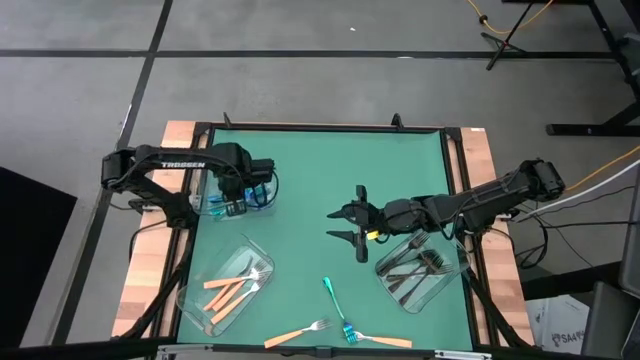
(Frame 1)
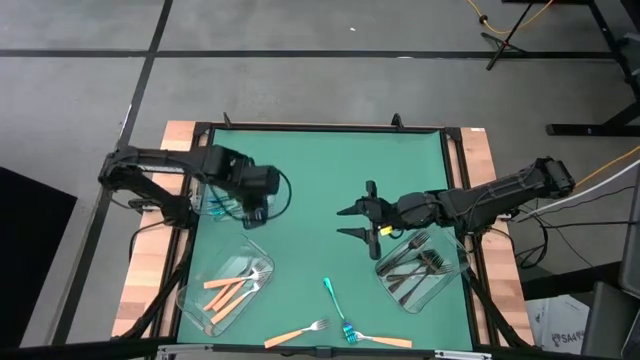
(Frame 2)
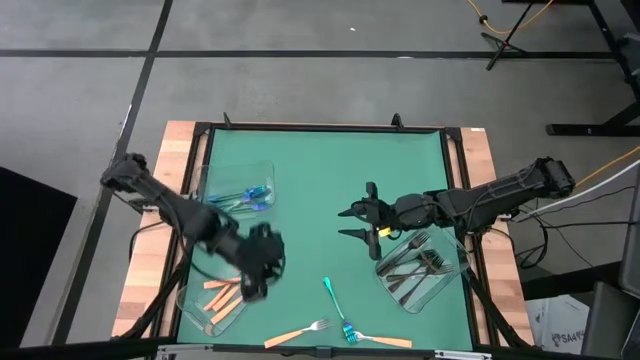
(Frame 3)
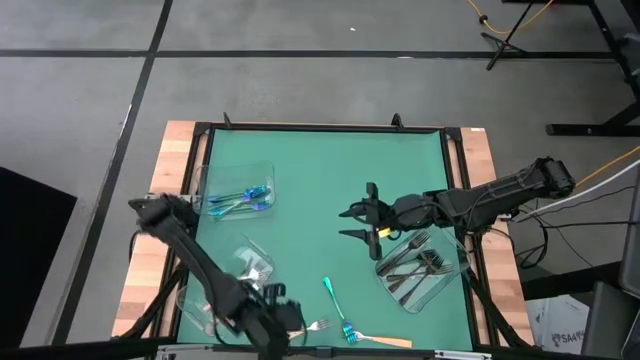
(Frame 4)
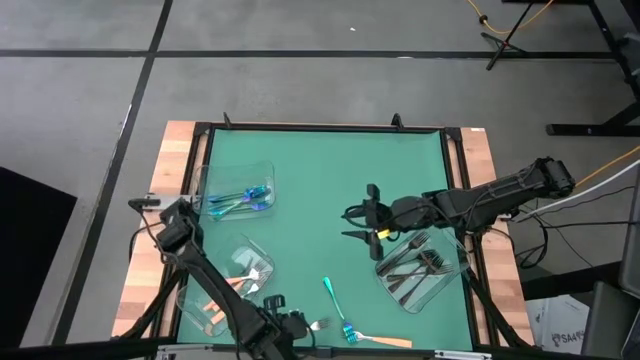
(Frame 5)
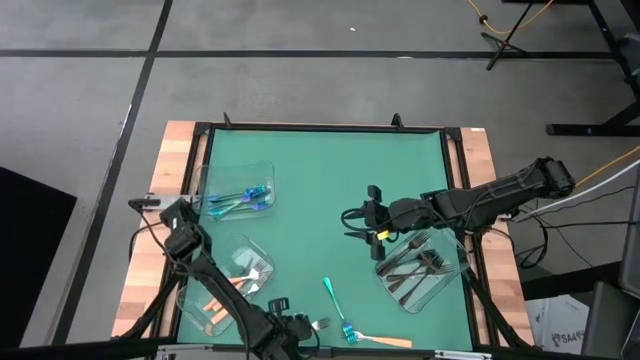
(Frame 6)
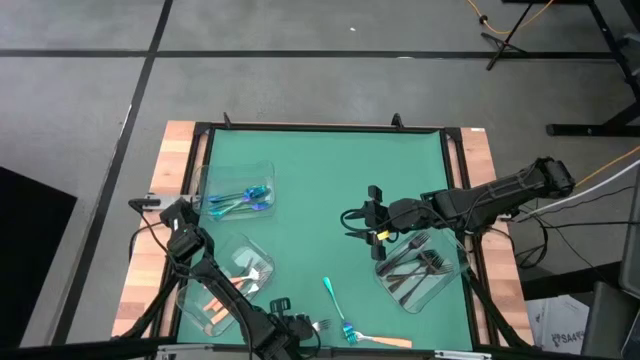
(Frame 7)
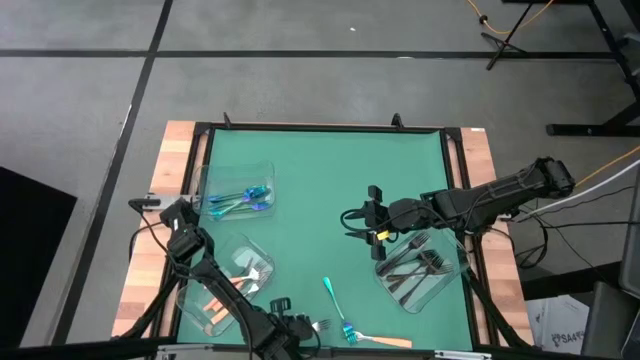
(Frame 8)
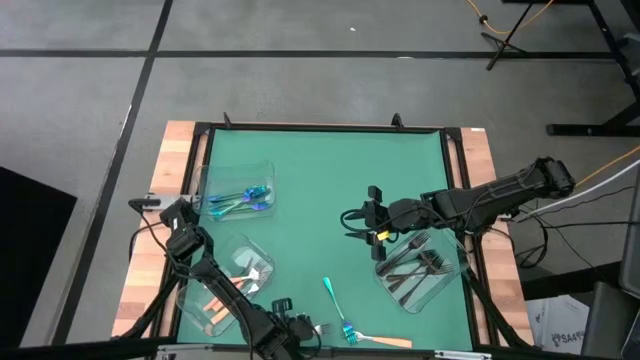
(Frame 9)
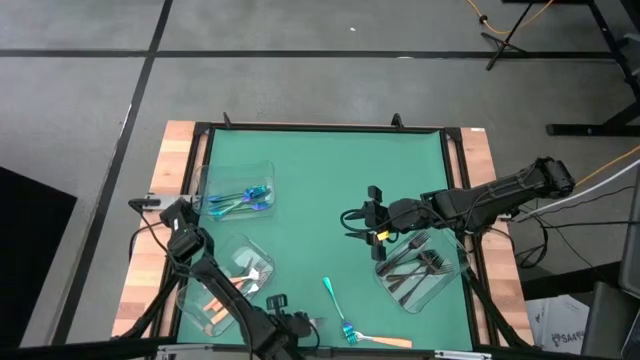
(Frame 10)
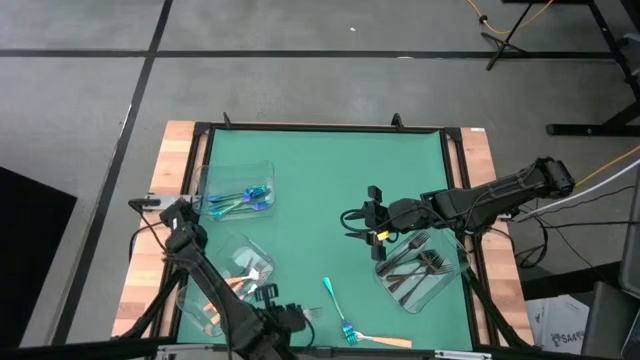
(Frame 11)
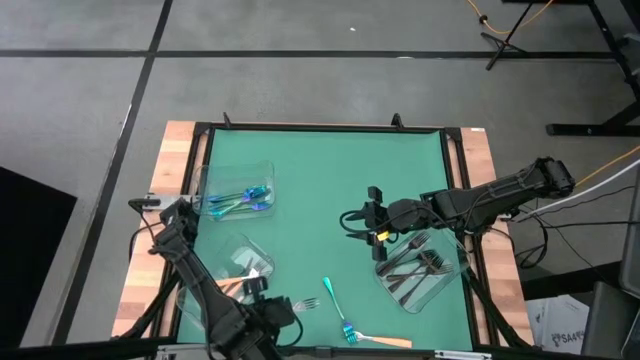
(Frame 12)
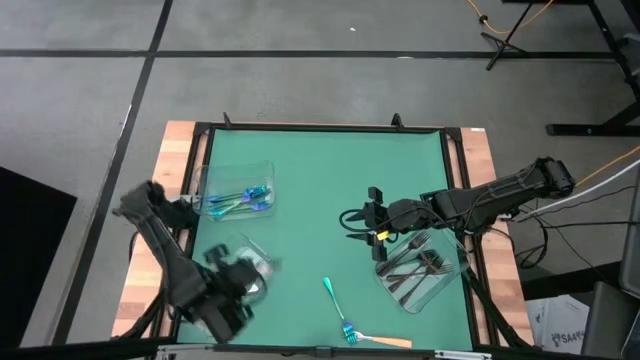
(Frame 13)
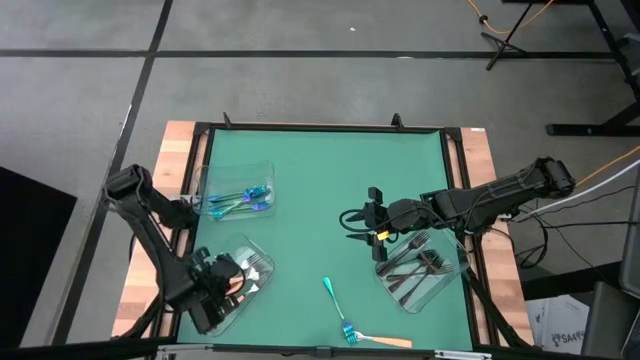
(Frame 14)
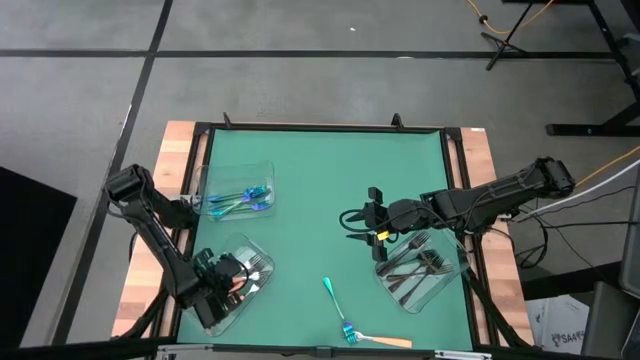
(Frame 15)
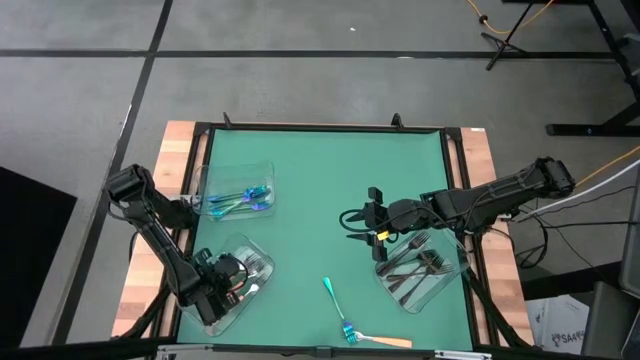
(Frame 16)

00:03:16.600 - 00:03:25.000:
Task: Sort silverware by color (type)
Put the left yellow fork into the bottom transparent bin

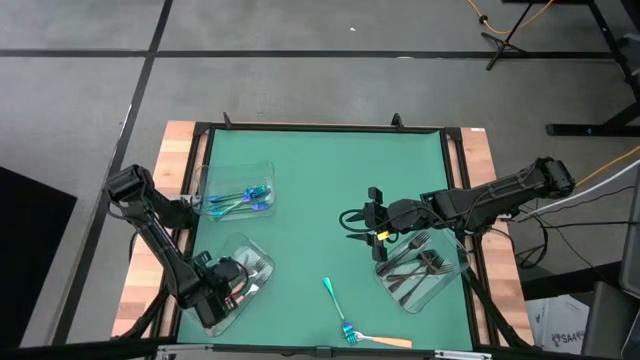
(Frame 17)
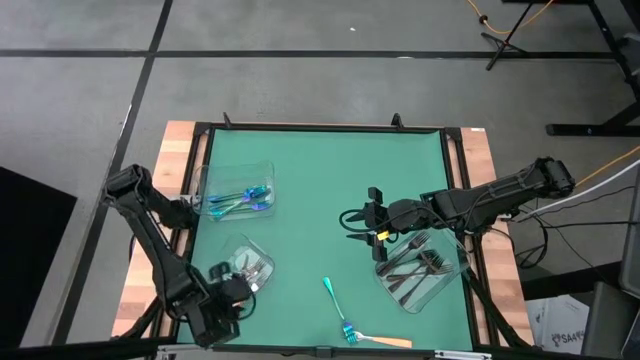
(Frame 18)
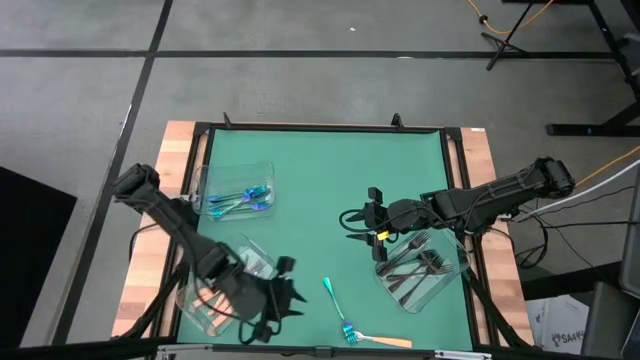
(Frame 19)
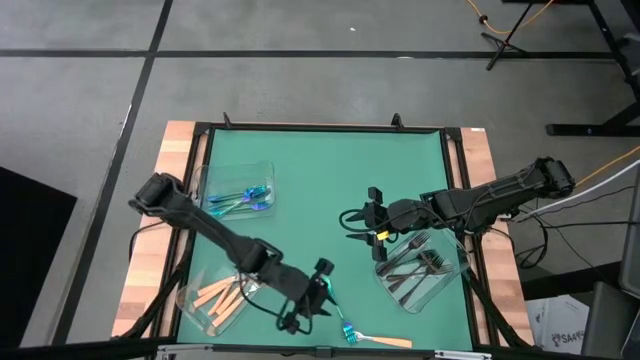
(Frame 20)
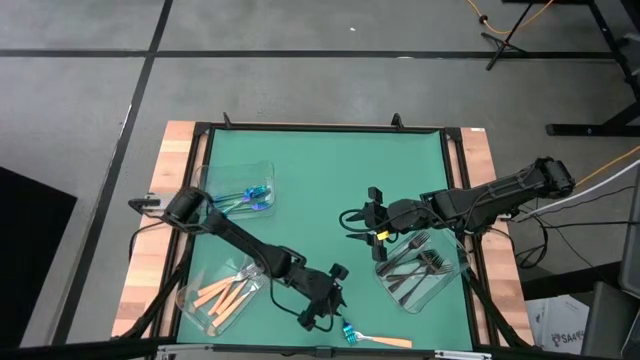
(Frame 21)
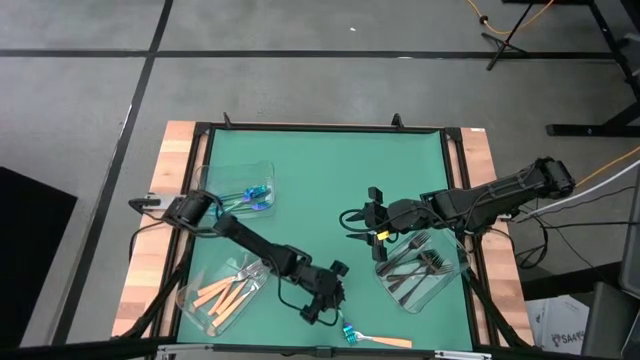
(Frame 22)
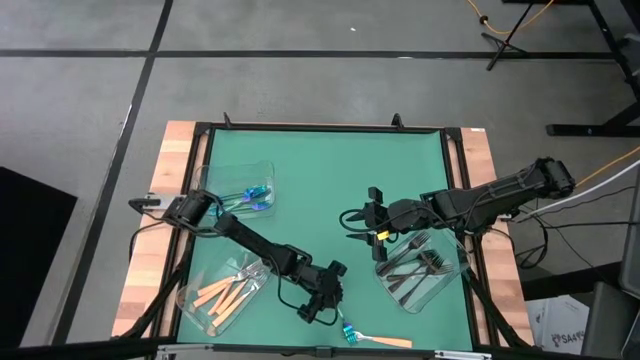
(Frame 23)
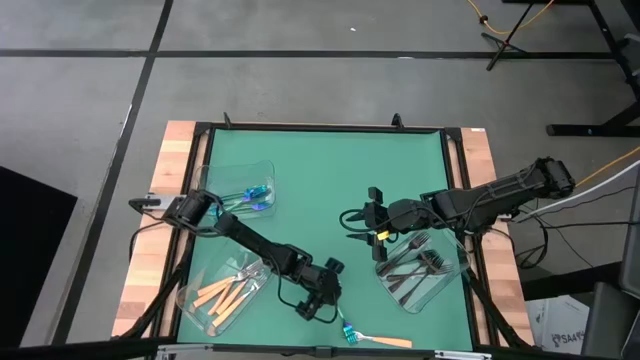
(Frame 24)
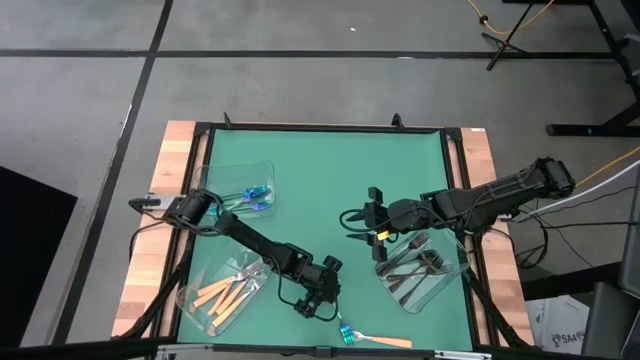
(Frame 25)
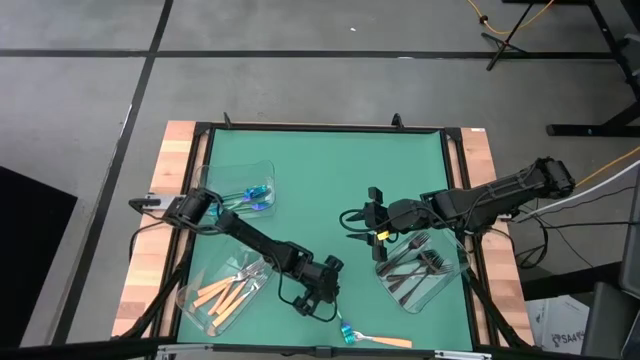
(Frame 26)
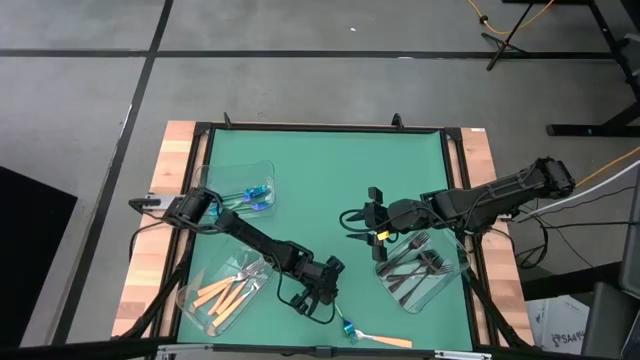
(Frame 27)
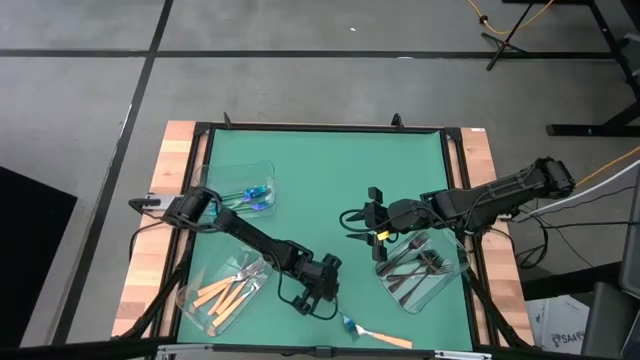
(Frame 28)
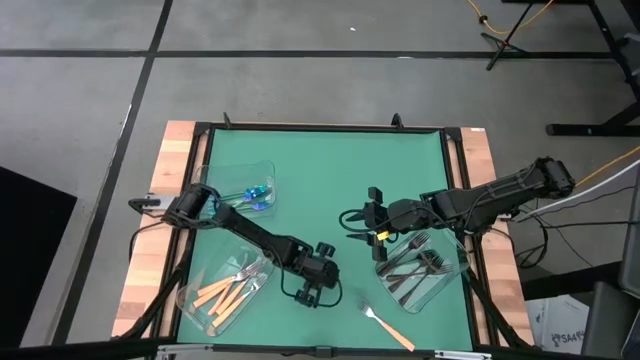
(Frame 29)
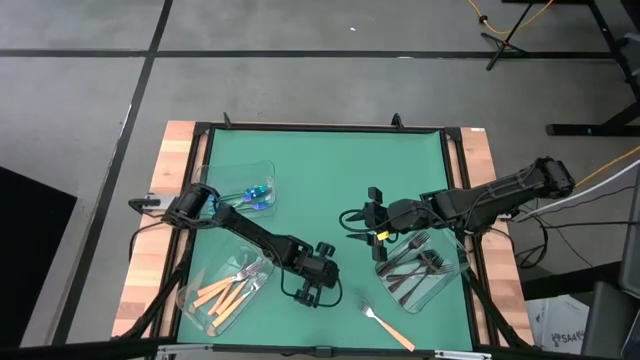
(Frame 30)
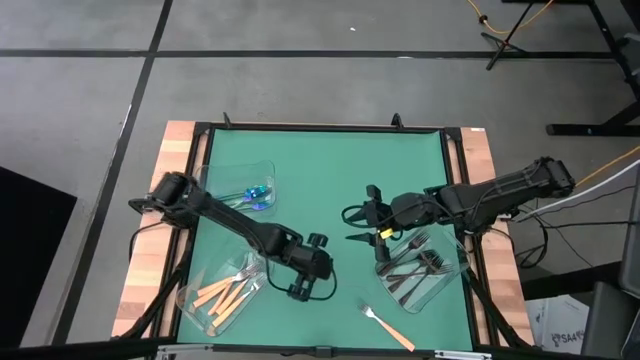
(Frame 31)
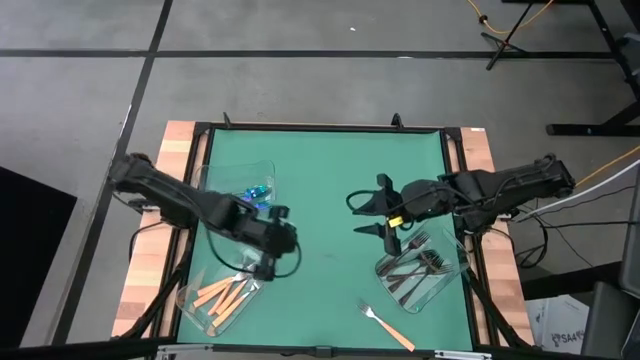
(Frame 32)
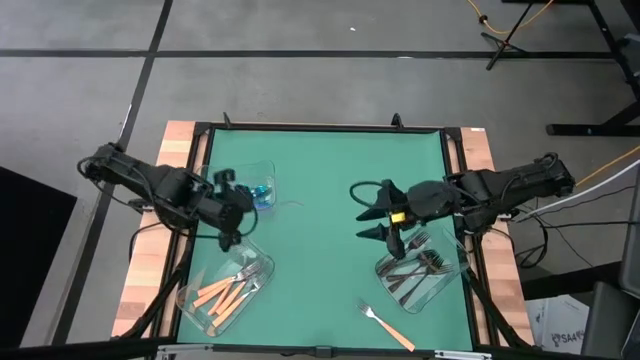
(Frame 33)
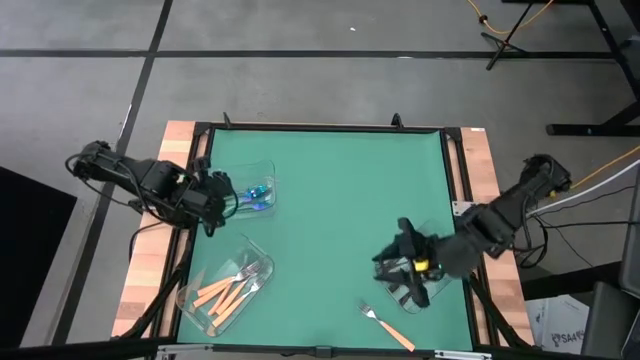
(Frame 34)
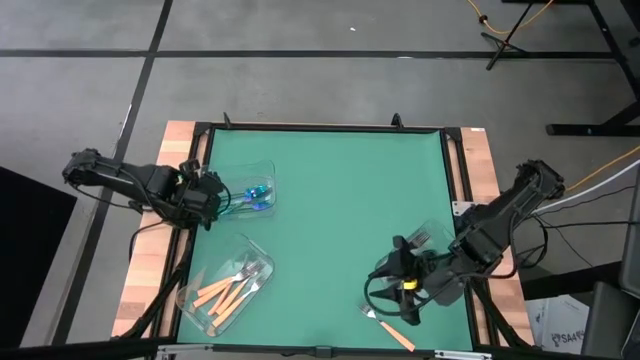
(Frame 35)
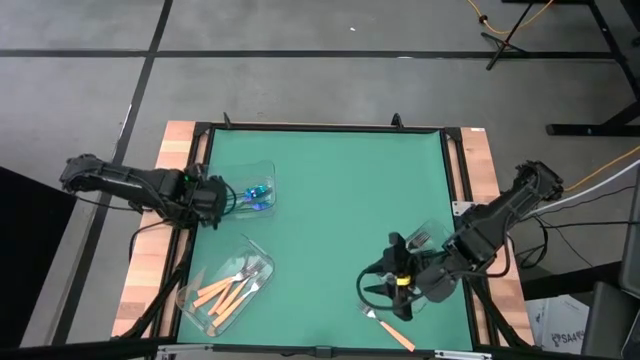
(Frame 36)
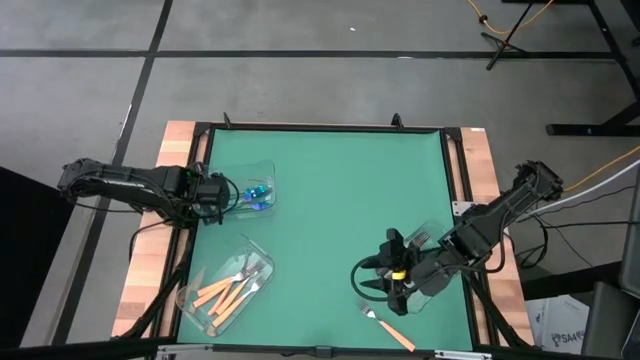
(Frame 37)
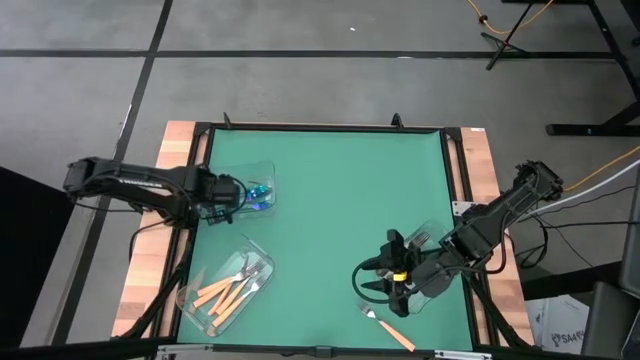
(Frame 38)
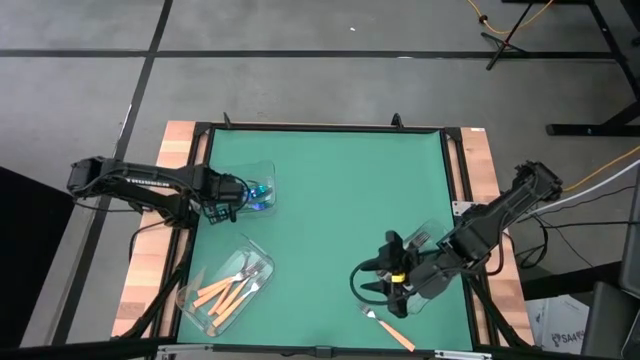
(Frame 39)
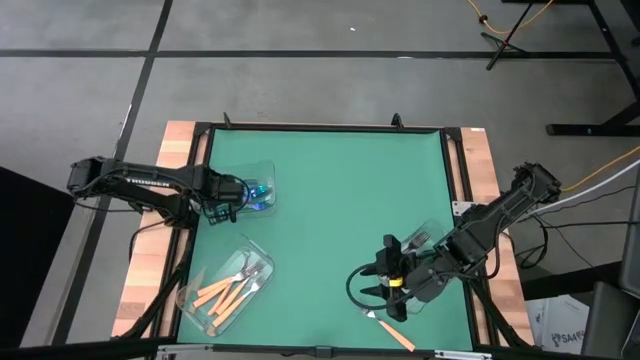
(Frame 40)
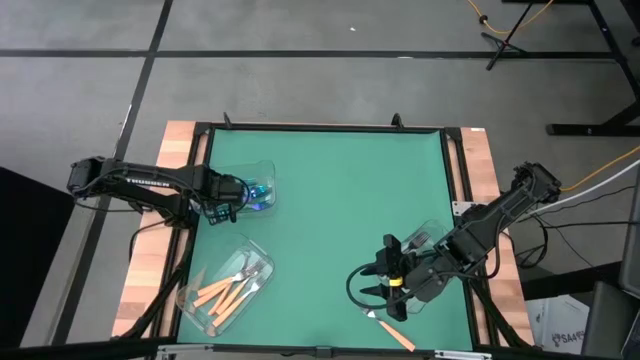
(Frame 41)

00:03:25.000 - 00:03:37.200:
Put the blue fork into the top transparent bin
